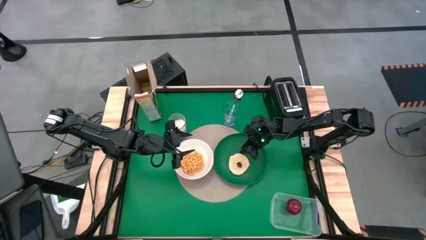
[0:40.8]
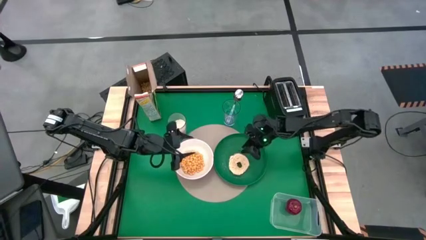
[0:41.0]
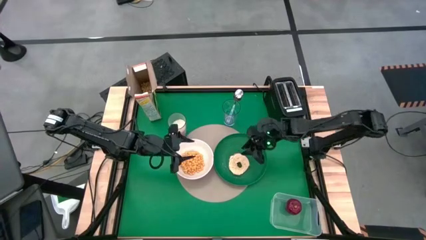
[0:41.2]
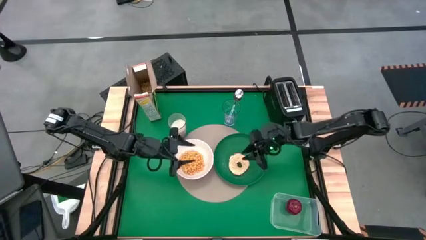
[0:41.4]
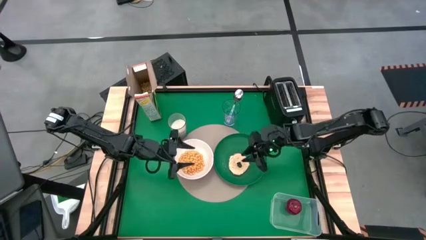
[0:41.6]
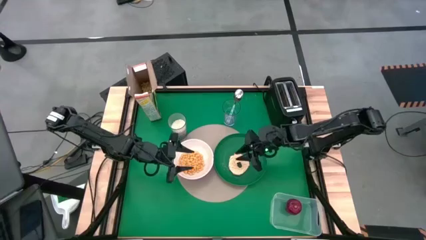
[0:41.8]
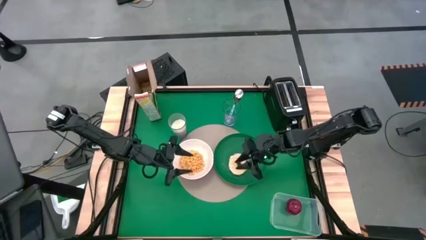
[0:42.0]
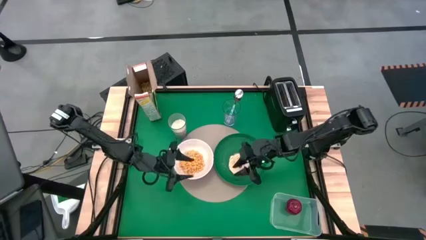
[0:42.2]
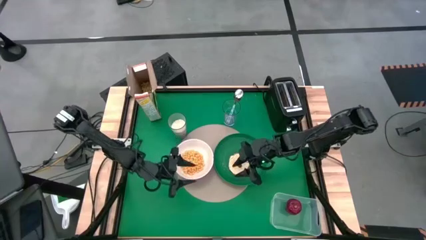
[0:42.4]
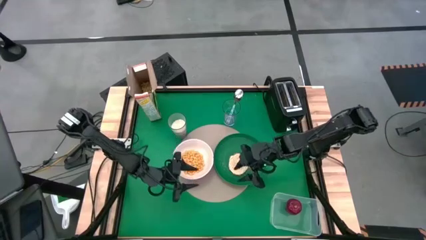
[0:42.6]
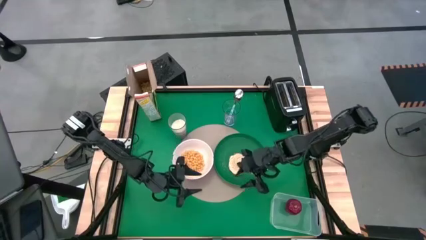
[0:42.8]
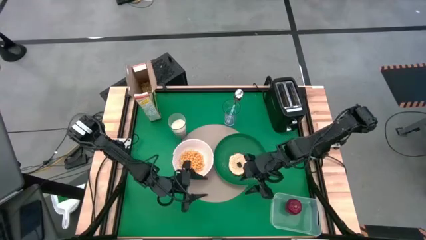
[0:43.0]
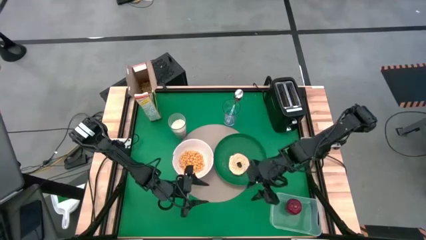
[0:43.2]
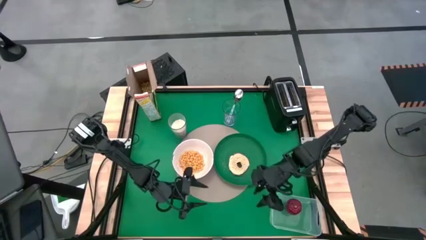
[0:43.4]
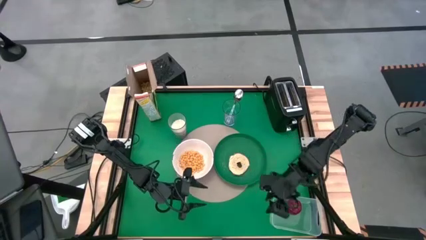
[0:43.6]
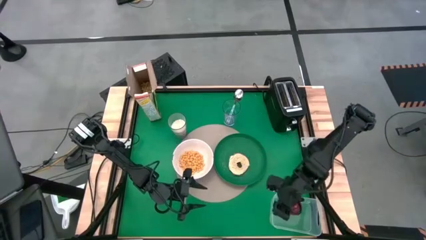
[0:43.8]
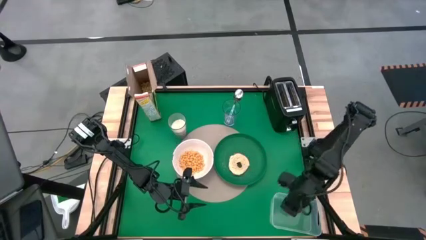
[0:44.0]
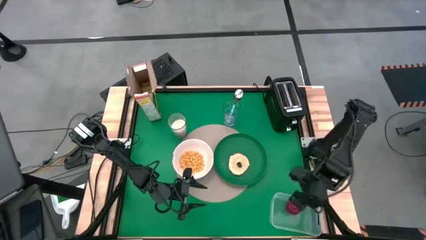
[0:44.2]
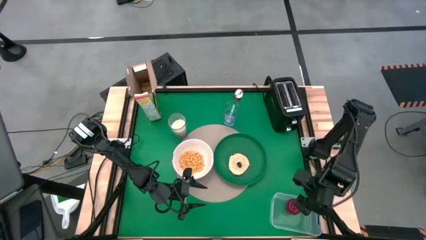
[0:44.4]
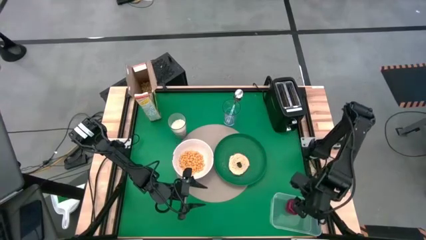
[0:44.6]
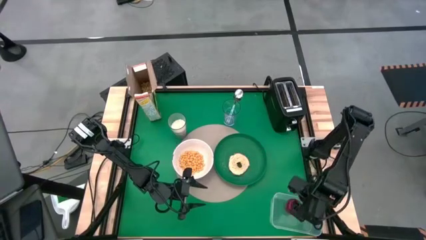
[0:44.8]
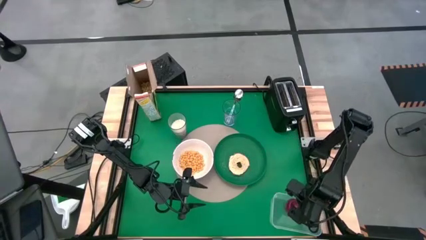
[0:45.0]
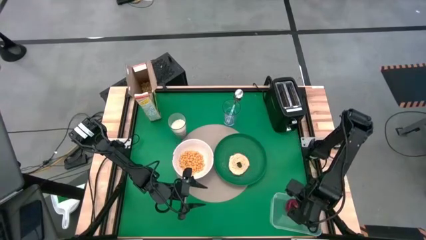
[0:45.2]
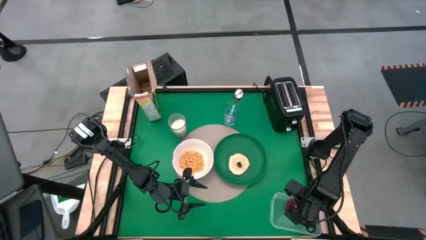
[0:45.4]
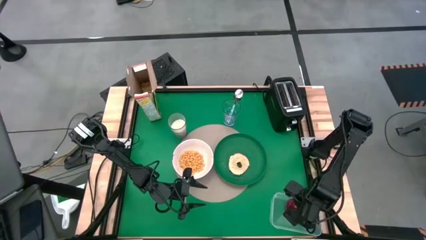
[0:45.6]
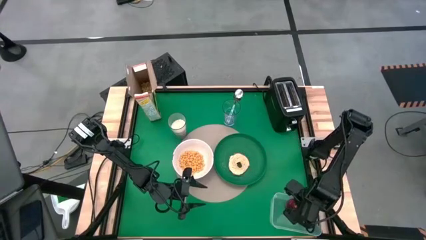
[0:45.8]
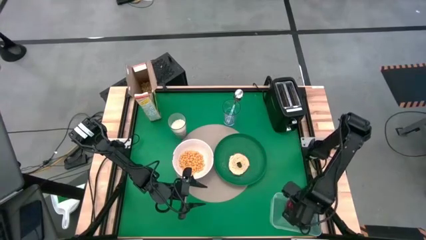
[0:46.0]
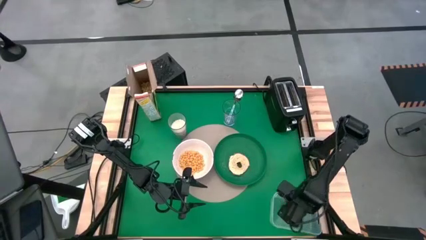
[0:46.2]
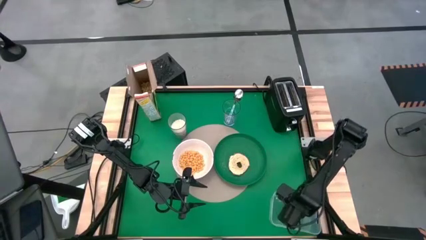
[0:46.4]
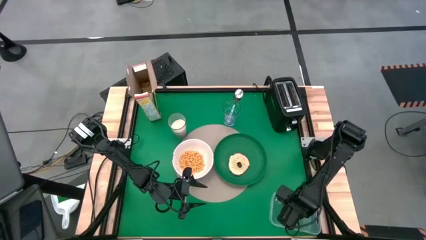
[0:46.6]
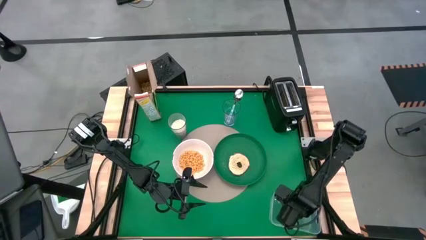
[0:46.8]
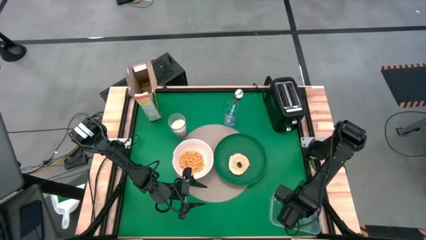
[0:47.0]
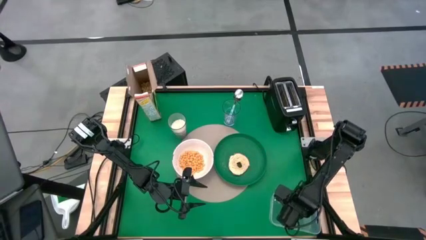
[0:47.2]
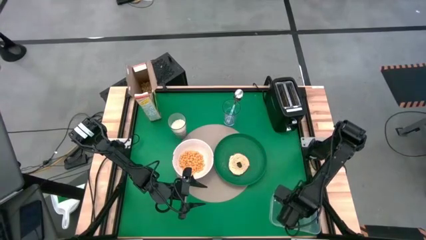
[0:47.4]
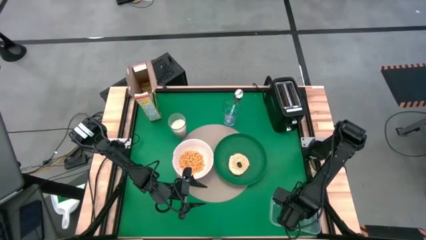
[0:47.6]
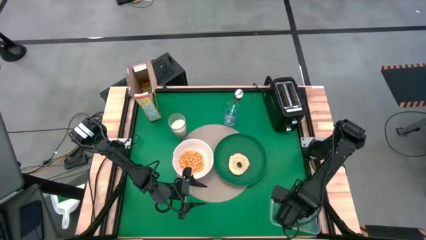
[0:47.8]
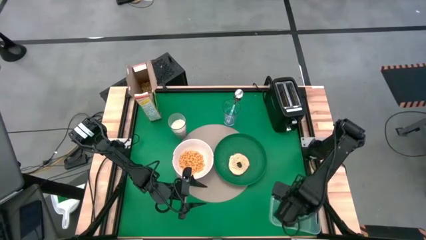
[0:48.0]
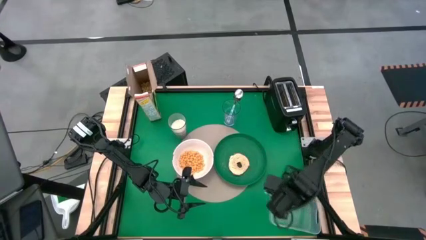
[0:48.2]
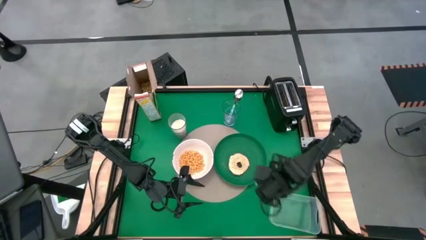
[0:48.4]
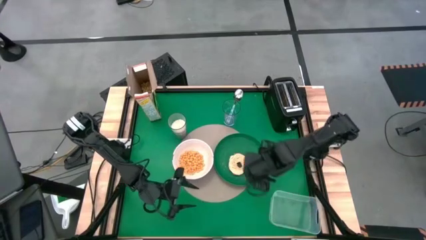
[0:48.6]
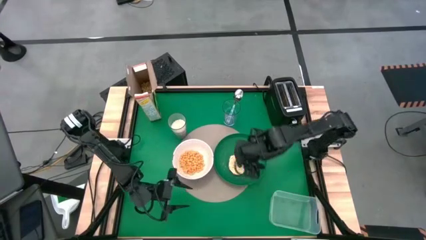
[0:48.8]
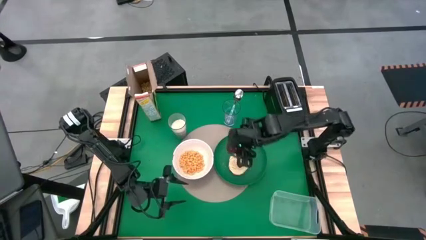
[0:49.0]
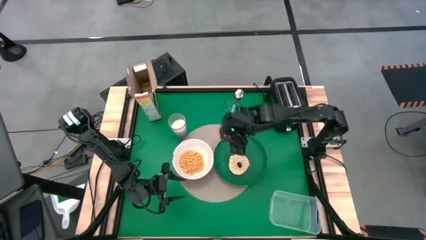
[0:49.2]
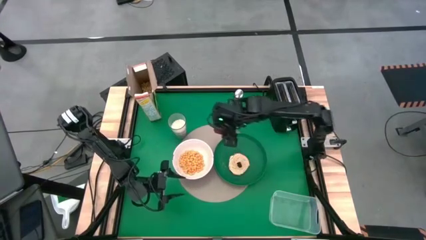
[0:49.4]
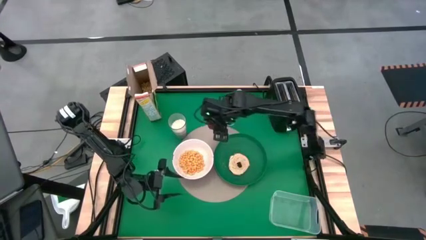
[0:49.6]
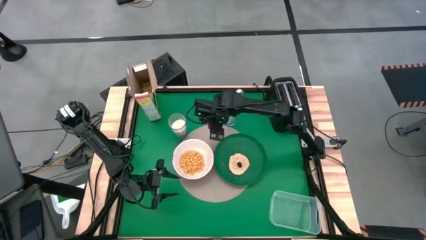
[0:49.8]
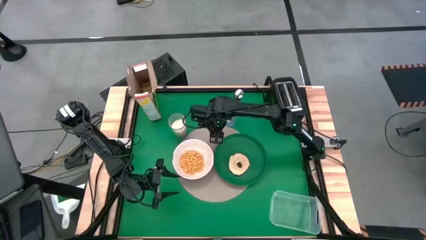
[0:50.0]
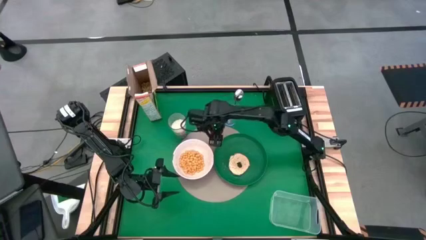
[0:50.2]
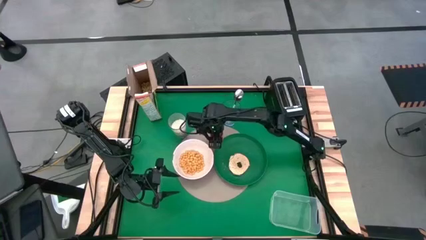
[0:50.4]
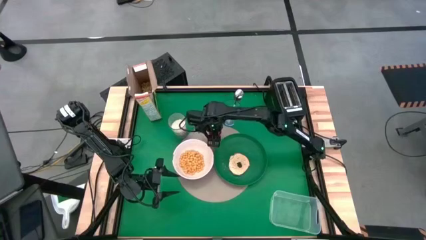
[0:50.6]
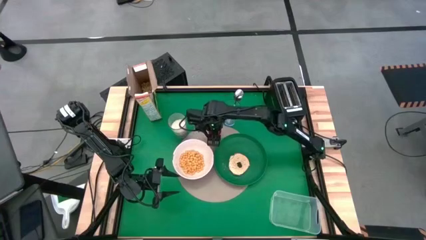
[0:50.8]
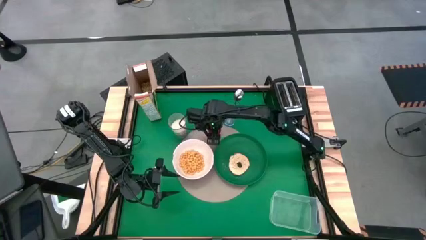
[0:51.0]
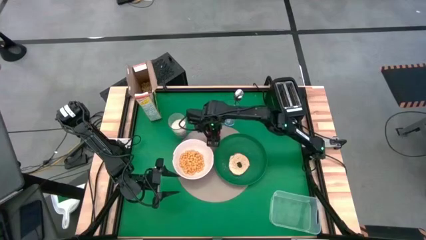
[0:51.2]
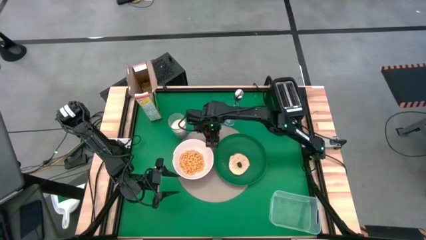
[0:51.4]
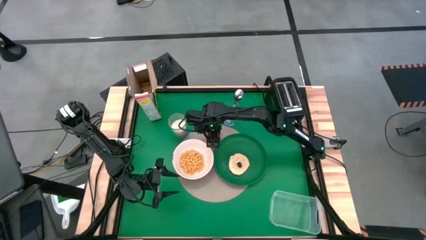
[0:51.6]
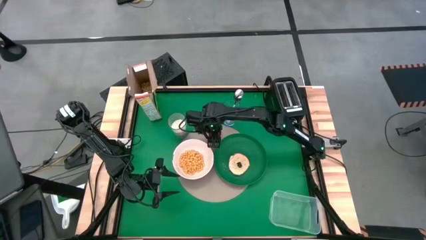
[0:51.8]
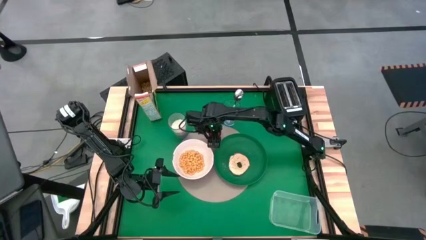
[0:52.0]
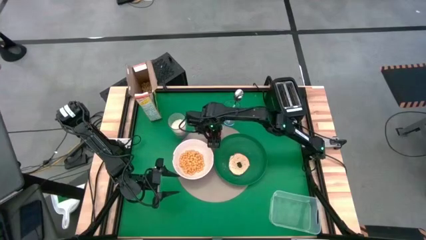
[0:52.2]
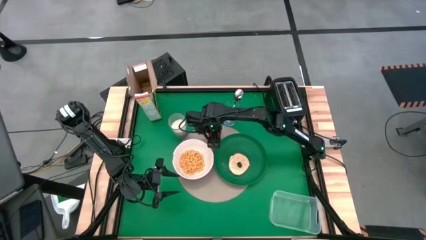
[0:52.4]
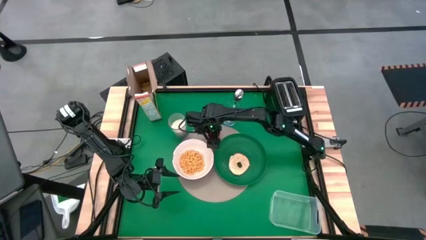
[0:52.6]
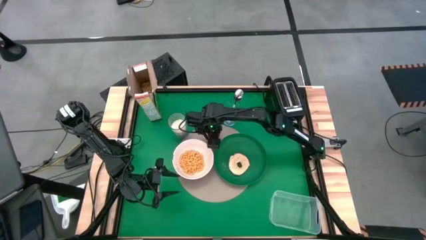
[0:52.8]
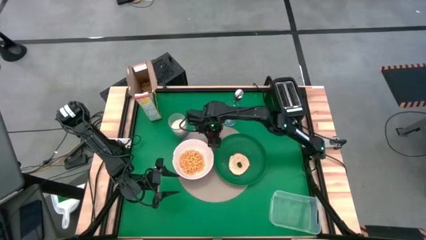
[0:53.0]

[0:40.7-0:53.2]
Task: Arrange a breakfast setting
Put the apple to the top left of the green plate on the grey mat

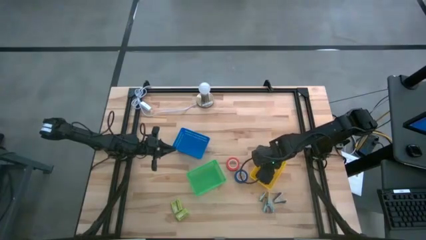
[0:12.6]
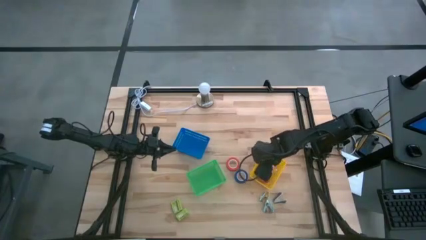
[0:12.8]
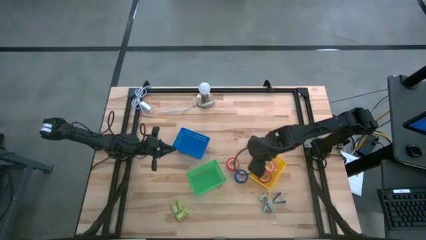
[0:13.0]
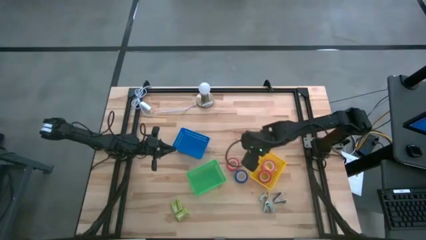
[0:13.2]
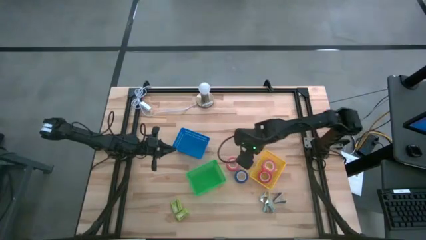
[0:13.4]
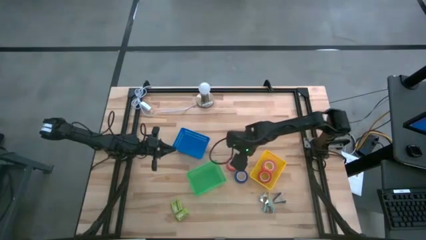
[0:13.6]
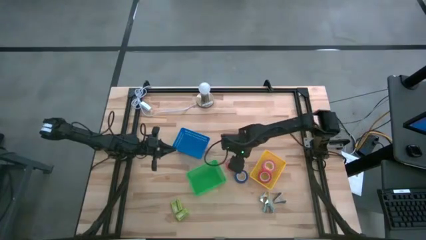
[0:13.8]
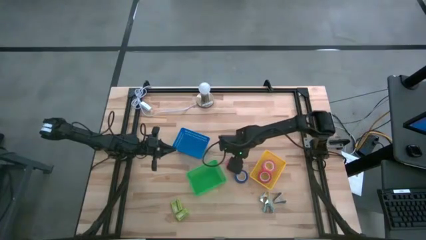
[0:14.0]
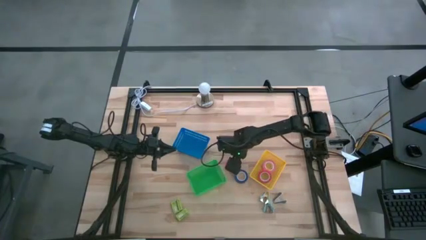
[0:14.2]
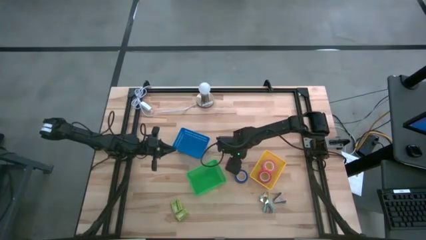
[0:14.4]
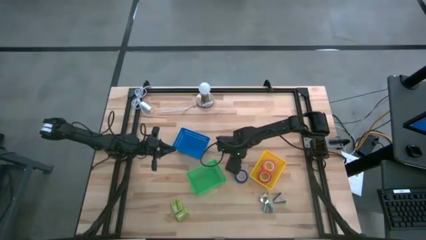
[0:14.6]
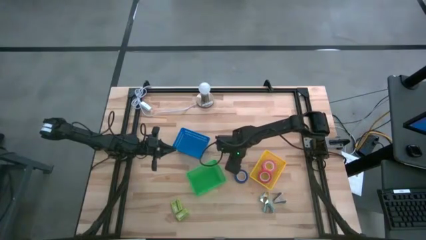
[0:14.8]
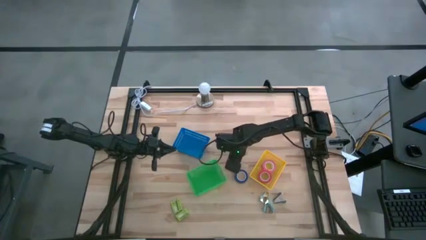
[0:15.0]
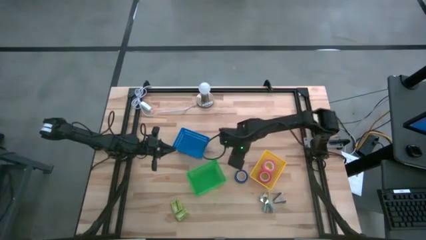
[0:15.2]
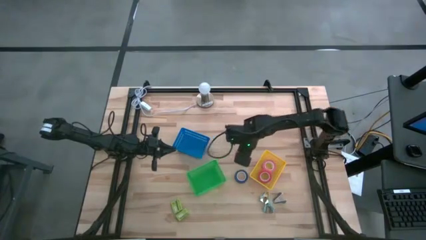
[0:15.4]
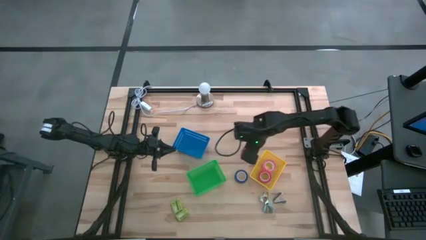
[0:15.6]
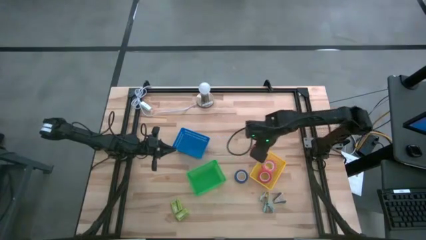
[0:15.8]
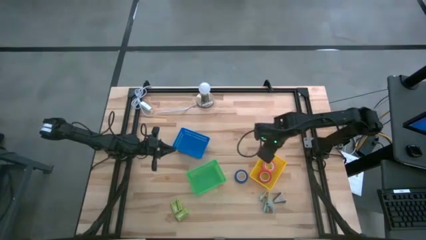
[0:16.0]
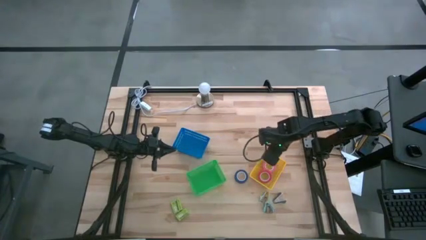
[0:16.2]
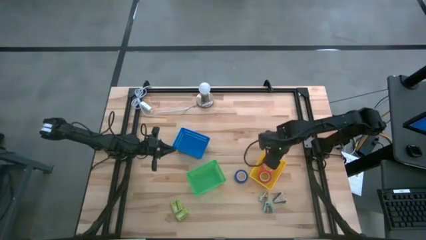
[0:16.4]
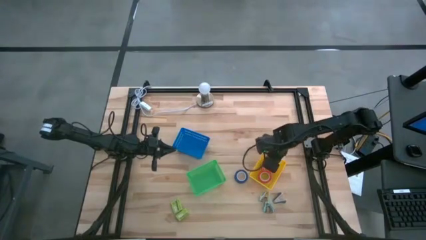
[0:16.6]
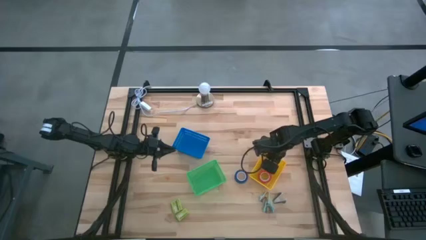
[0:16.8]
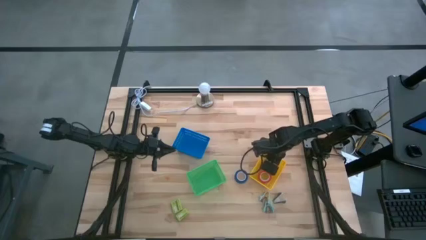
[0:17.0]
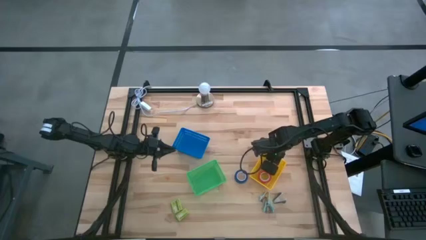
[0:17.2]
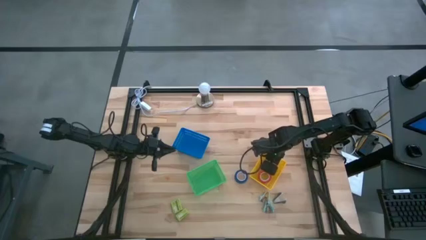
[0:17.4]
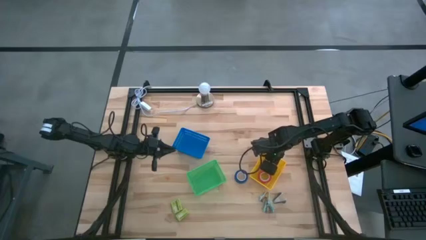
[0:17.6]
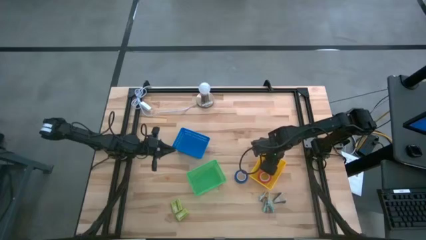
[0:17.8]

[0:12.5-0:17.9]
Task: Pick and place Stapler, Stapler remover, tape
Put the red tape into the yellow bin
